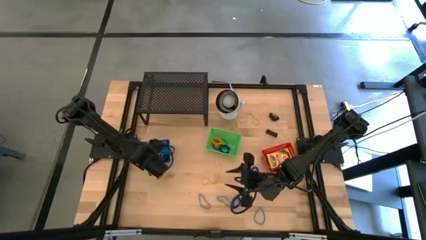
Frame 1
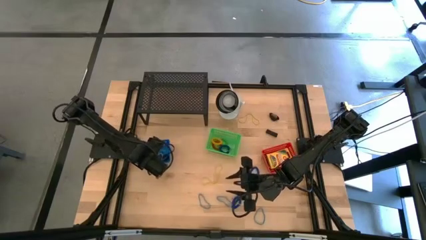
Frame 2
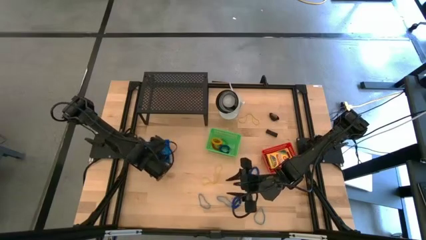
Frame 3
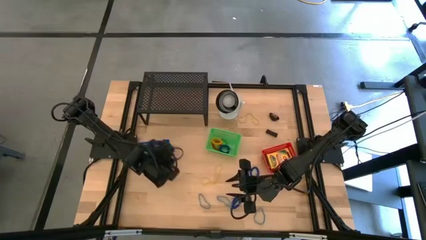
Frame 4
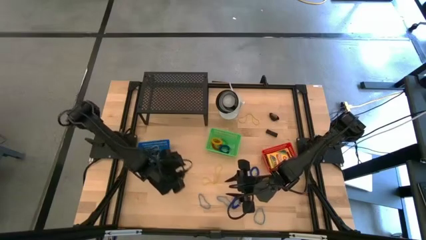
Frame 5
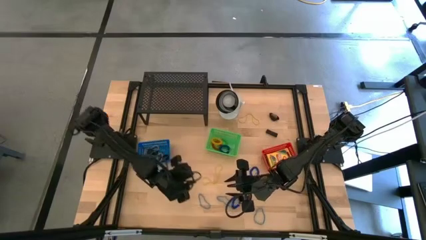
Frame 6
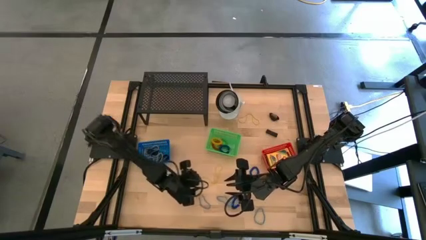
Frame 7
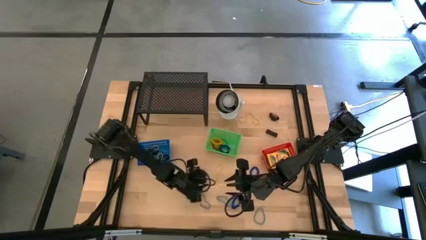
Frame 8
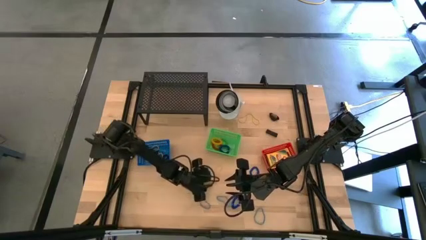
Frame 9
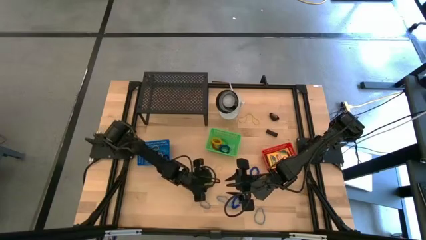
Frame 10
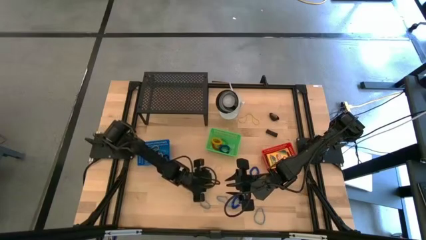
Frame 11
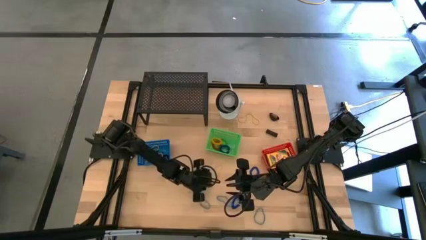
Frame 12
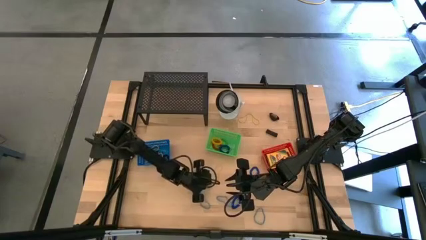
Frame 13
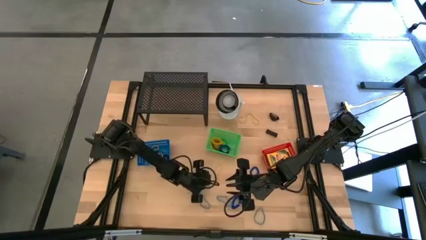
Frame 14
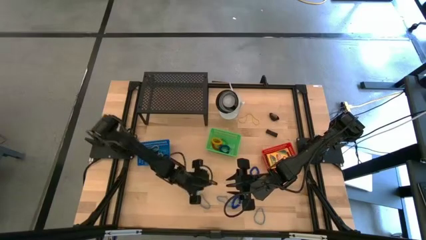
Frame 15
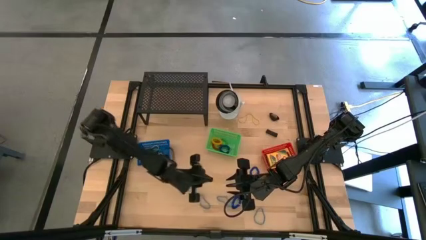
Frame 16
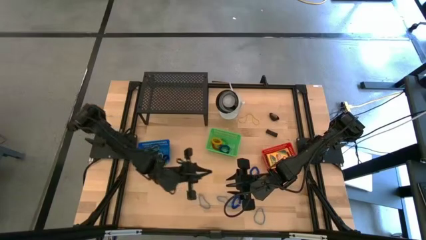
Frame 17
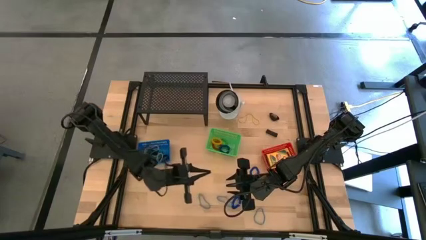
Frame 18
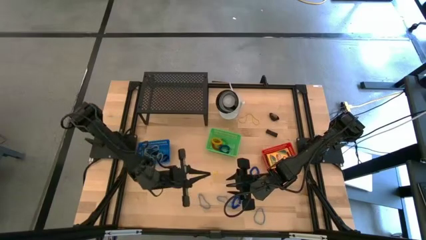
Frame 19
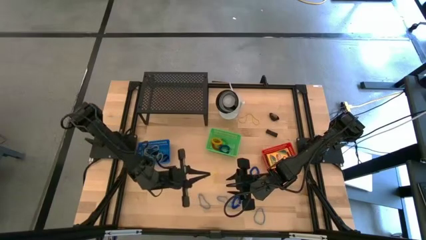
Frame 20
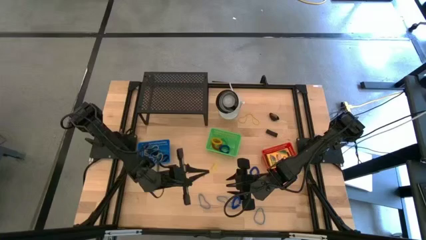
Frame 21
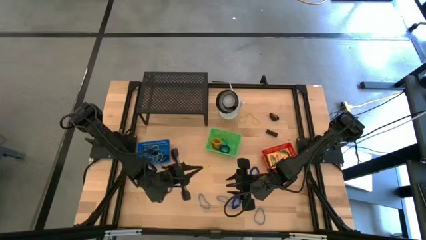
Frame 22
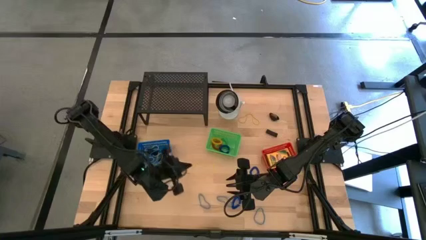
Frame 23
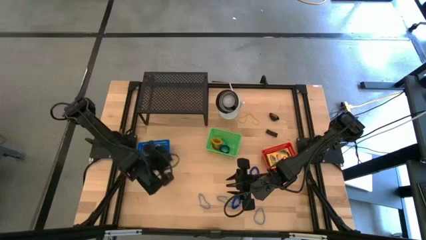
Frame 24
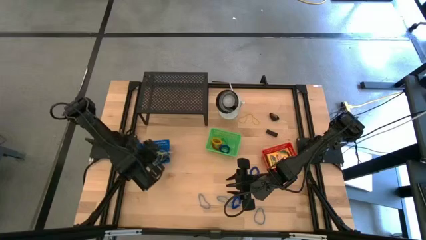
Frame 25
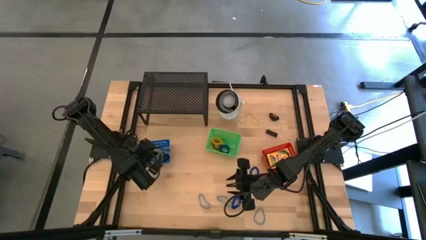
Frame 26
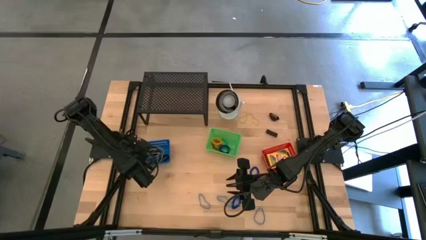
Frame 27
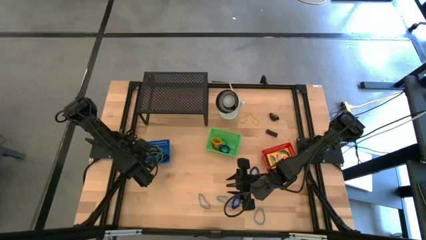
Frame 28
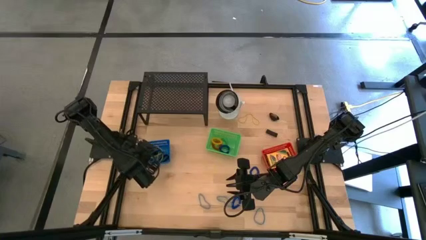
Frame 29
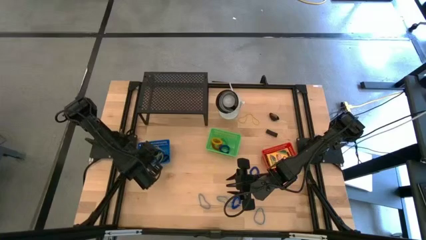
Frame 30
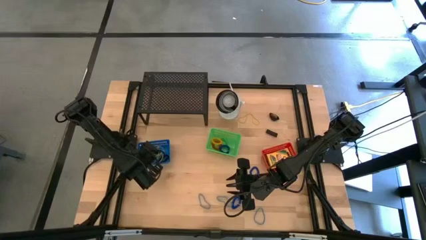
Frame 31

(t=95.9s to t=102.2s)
Task: Pick & Place Office Desk Supplies
Put the yellow rubber band into the blue bin

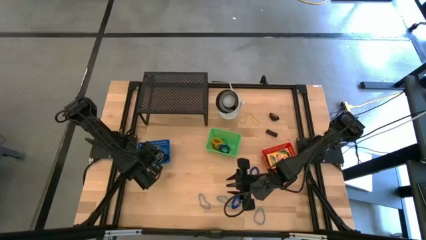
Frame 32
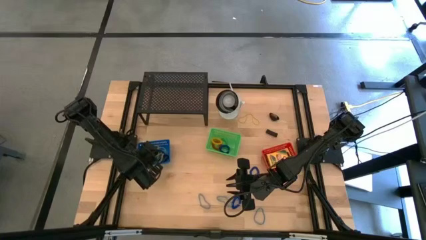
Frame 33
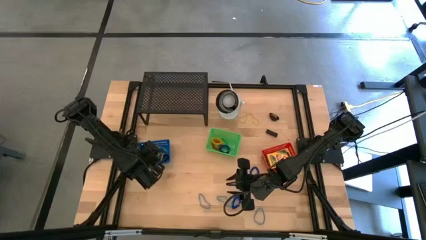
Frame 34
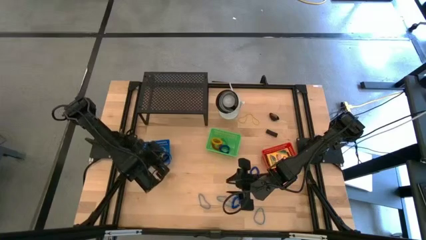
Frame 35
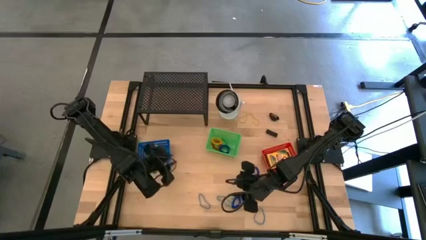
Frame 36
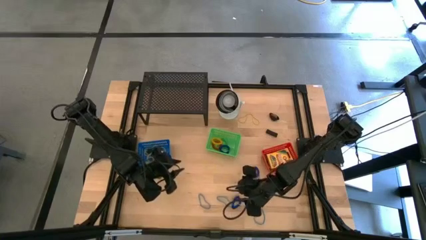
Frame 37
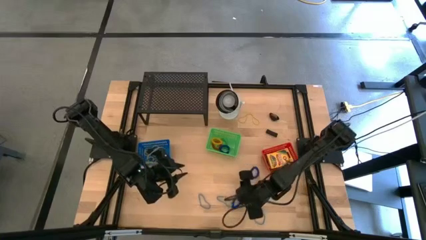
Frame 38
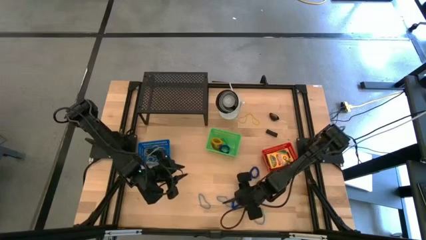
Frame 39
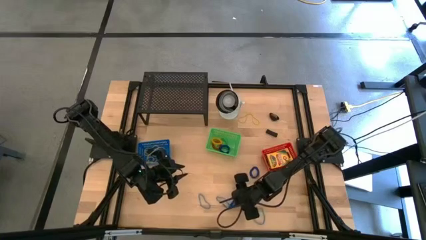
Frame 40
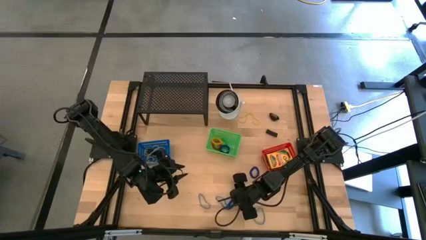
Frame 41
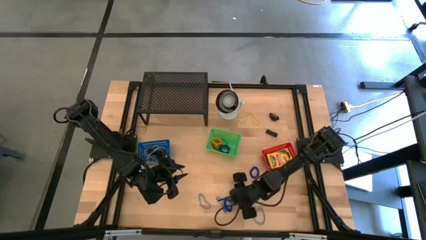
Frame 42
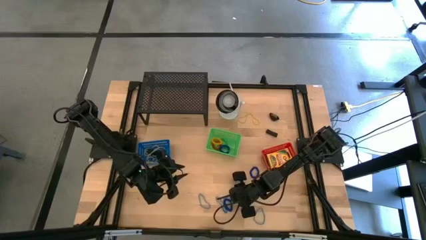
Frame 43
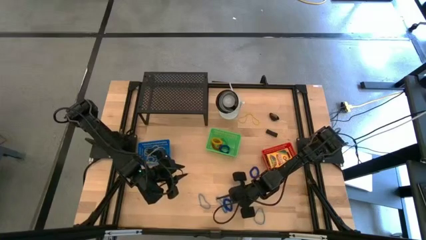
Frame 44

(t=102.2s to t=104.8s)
Put the blue spring keychain into the green bin

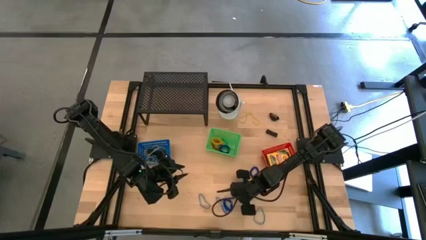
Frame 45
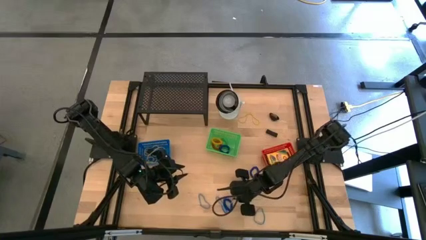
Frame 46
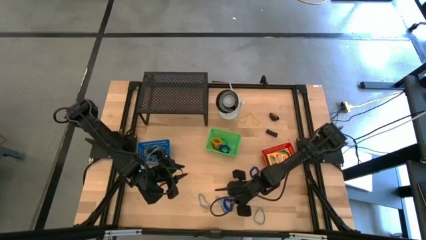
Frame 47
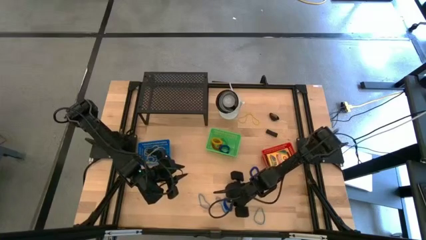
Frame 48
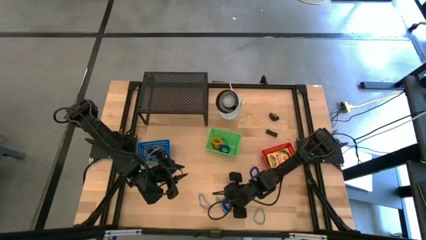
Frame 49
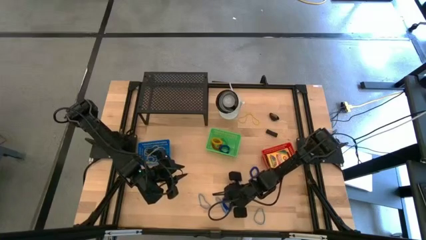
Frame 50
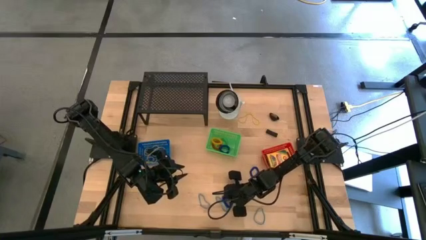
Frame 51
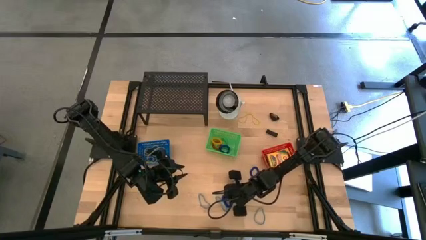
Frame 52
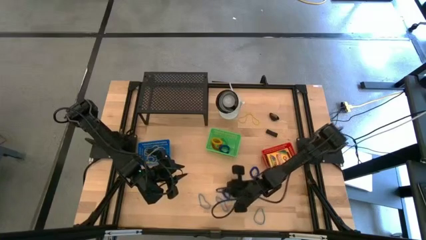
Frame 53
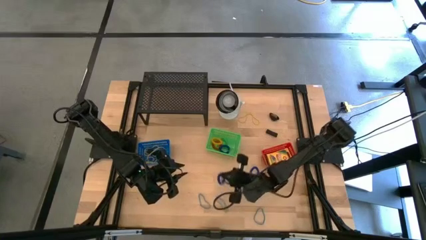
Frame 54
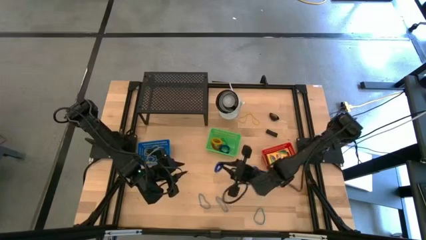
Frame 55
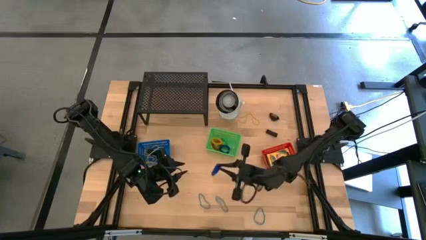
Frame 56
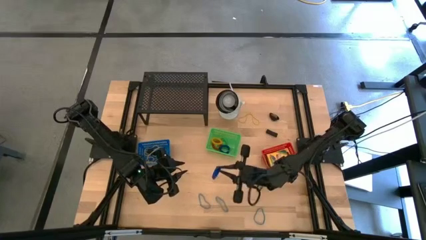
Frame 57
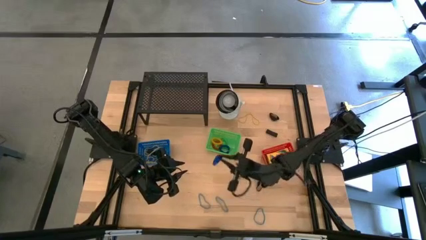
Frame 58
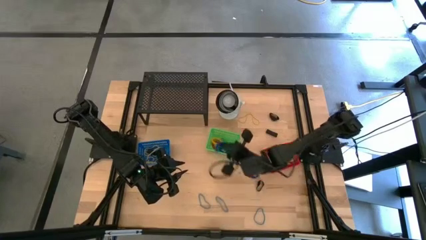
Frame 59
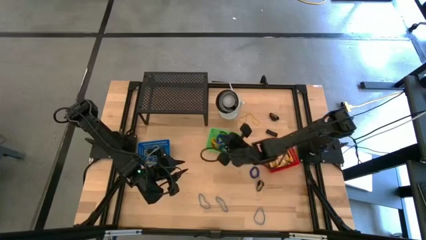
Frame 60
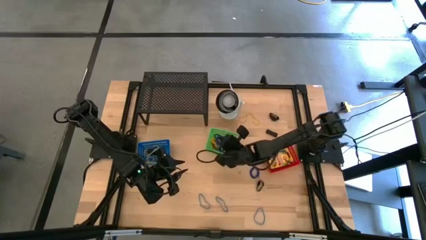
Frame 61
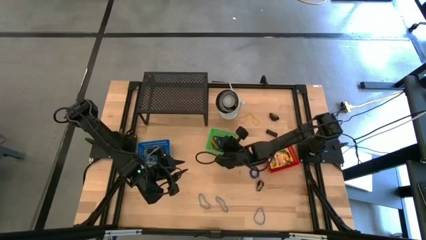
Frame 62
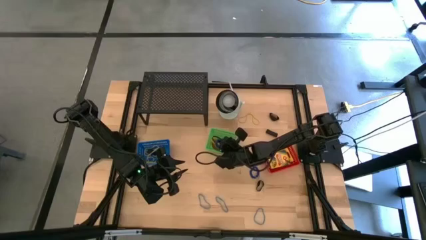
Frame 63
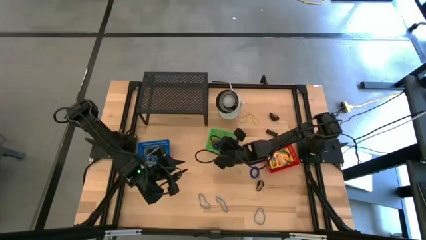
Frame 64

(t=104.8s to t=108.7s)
Put the blue spring keychain into the green bin

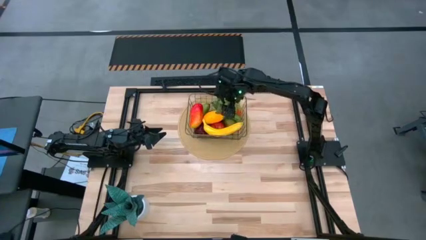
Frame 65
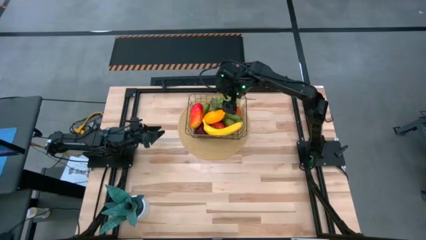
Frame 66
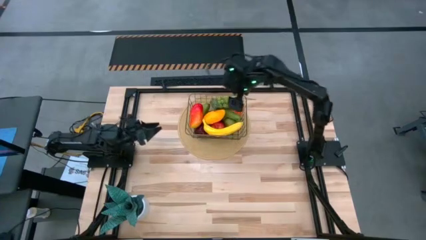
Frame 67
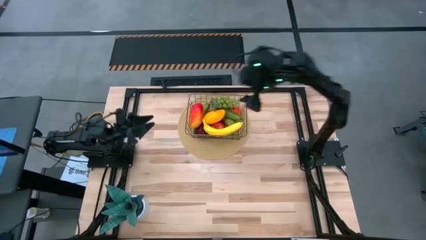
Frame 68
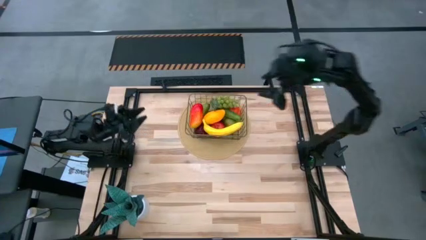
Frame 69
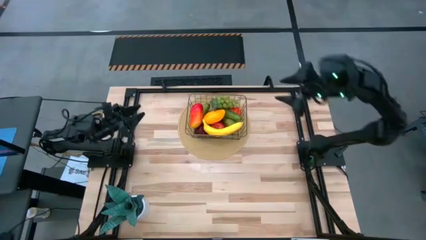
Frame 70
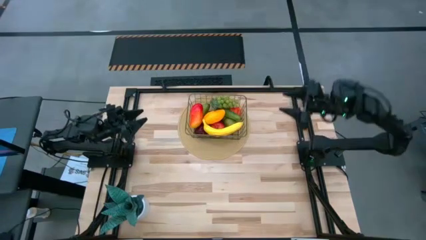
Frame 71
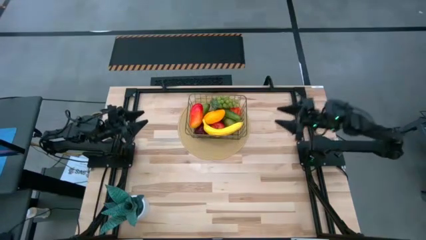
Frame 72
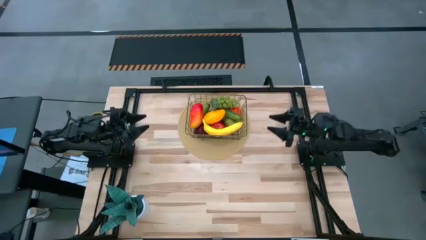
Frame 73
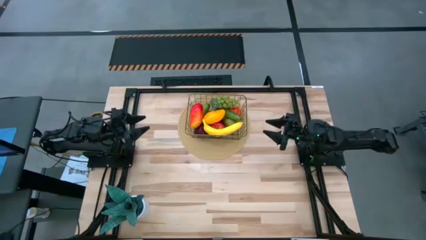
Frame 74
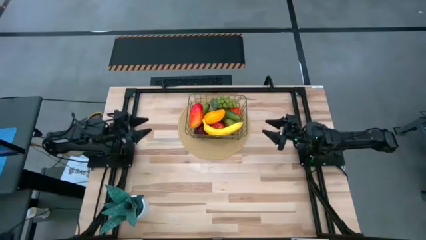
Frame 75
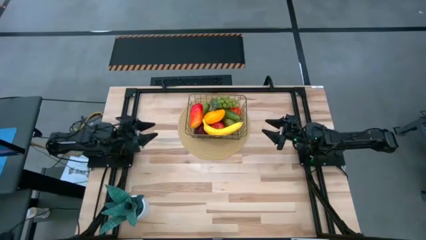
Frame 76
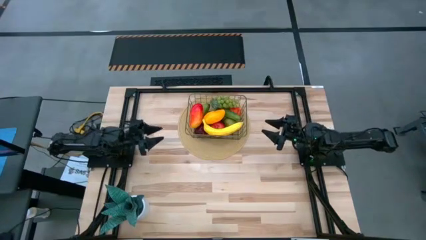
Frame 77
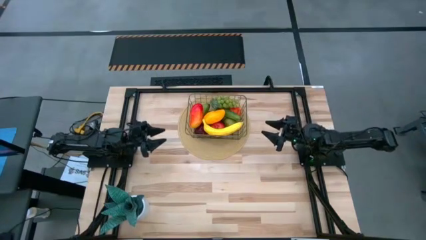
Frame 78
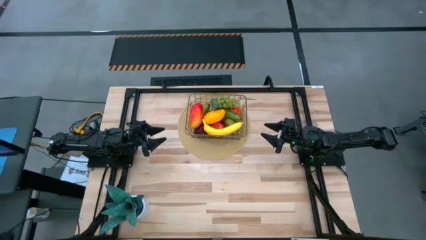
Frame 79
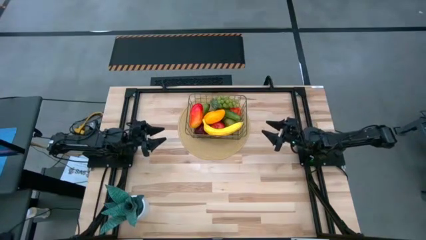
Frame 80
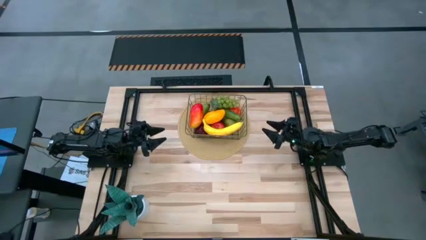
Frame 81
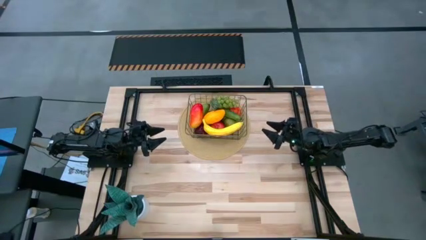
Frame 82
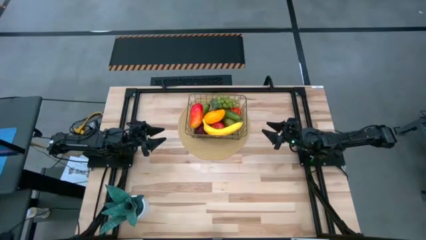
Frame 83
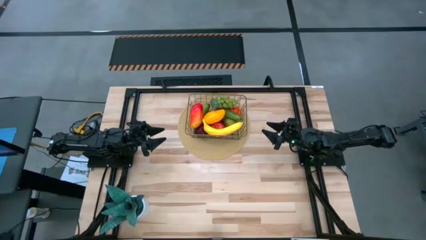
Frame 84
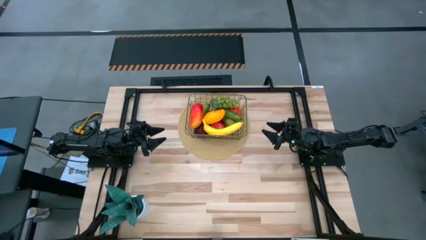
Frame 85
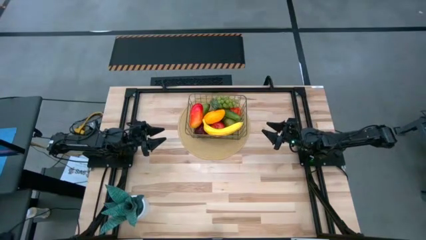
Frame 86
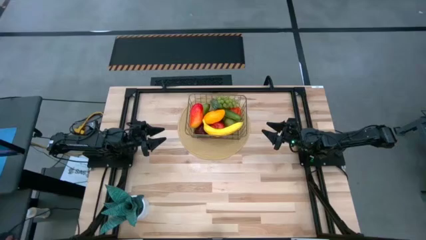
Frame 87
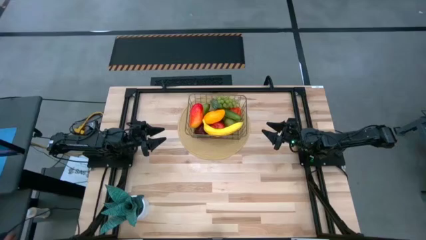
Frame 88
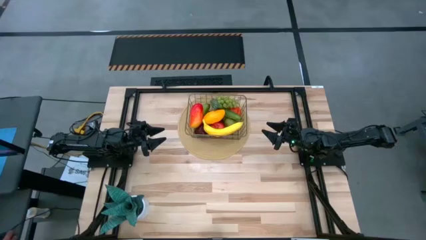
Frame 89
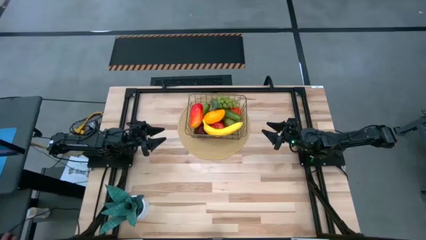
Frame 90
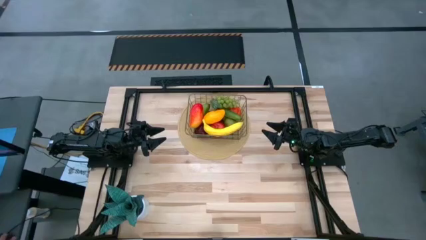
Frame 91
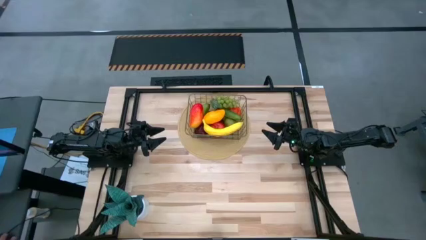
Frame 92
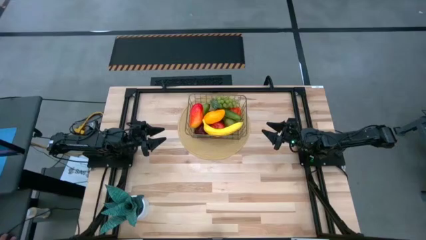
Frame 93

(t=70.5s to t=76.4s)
Task: Build produce basket
Return to Home Position
